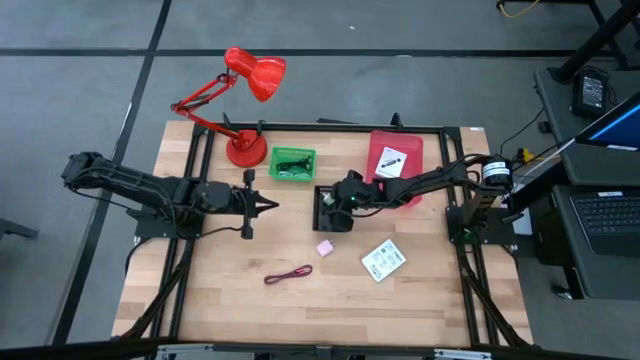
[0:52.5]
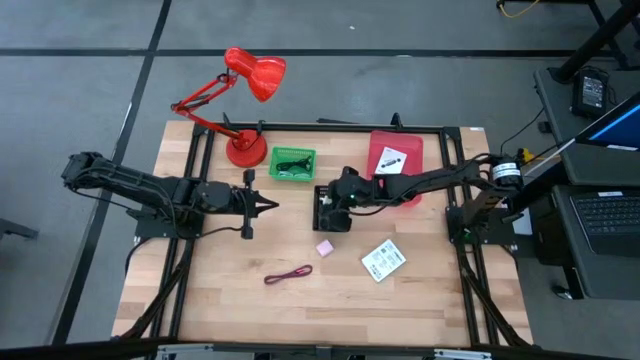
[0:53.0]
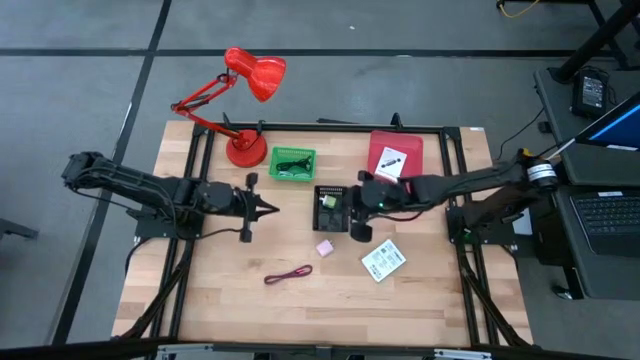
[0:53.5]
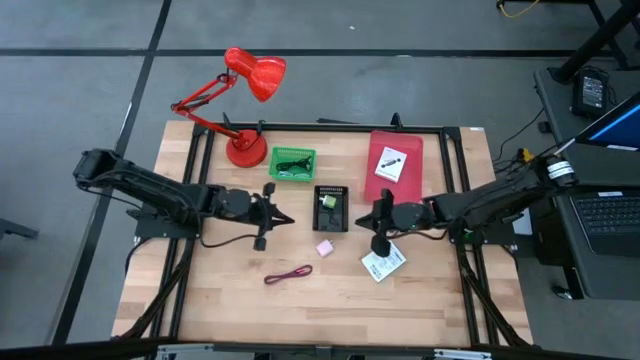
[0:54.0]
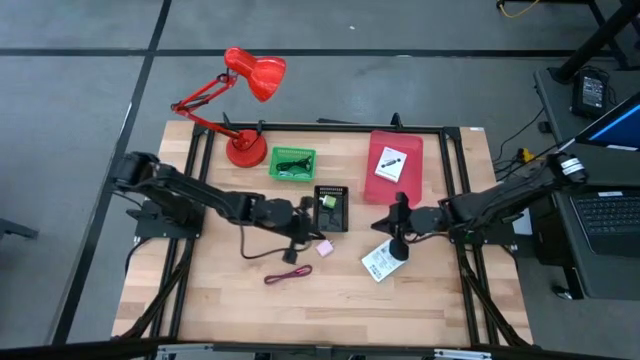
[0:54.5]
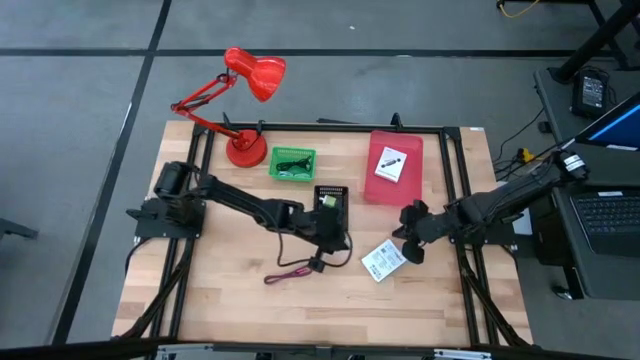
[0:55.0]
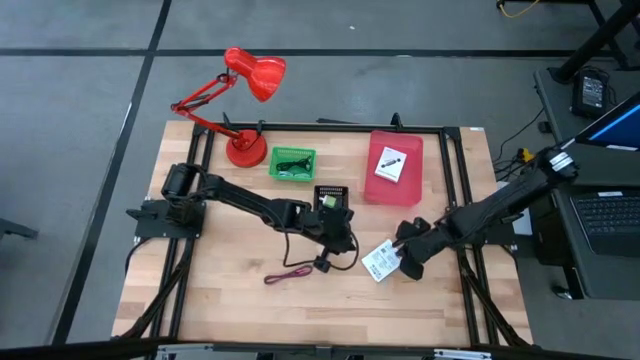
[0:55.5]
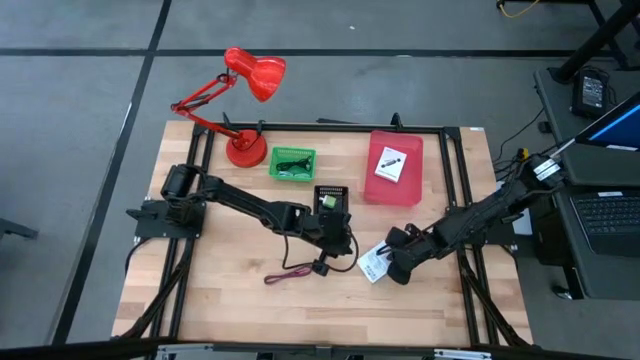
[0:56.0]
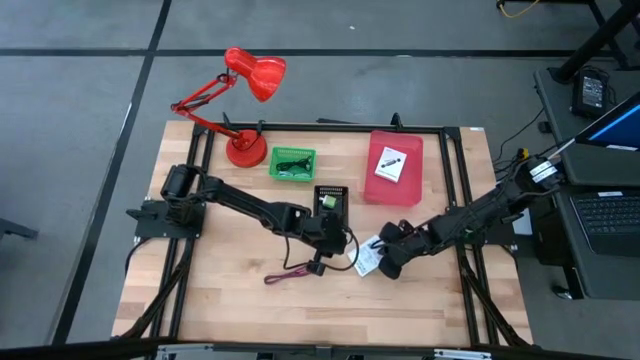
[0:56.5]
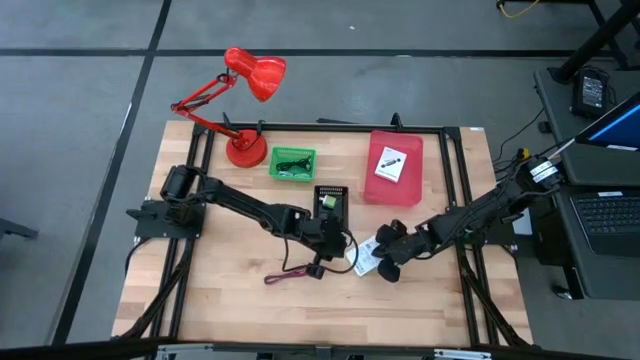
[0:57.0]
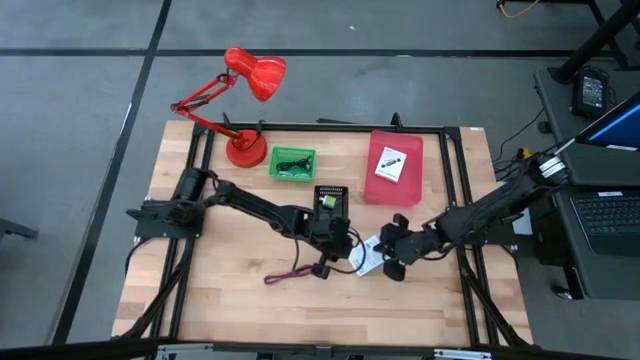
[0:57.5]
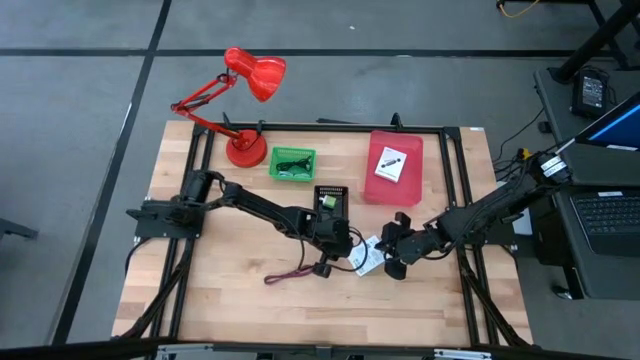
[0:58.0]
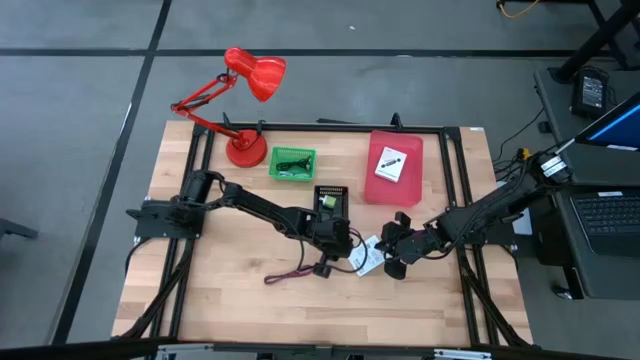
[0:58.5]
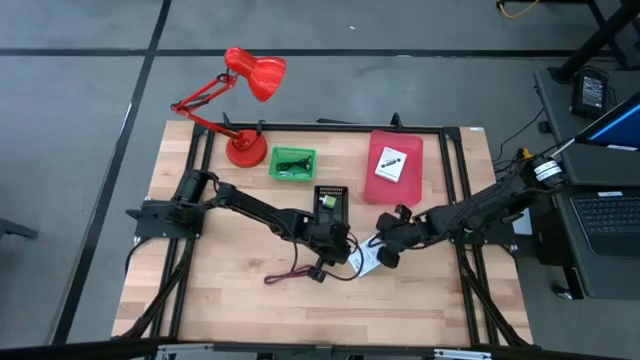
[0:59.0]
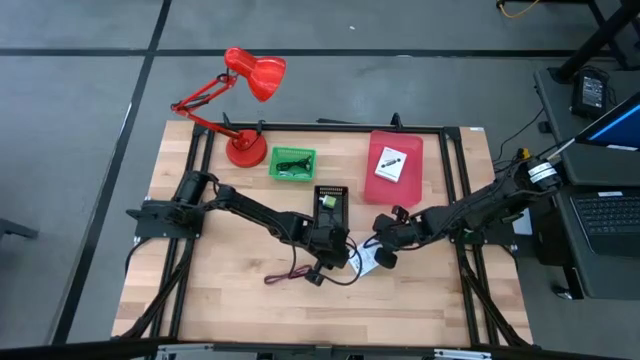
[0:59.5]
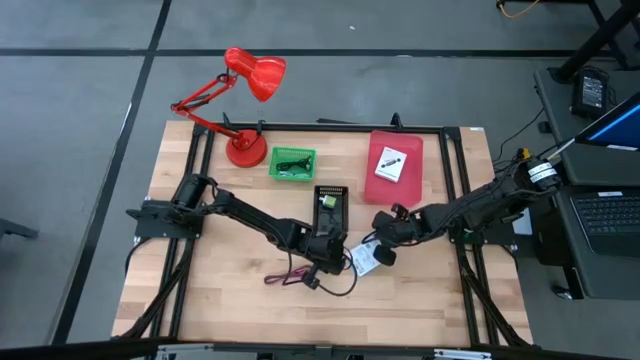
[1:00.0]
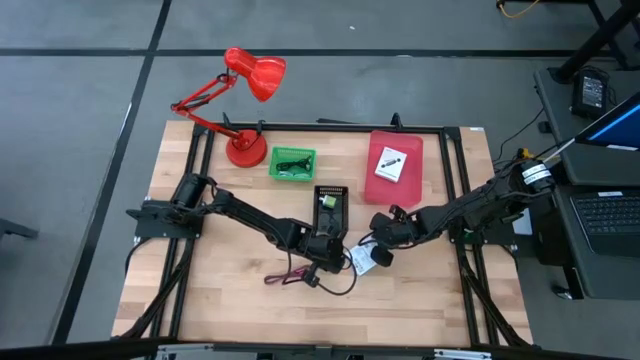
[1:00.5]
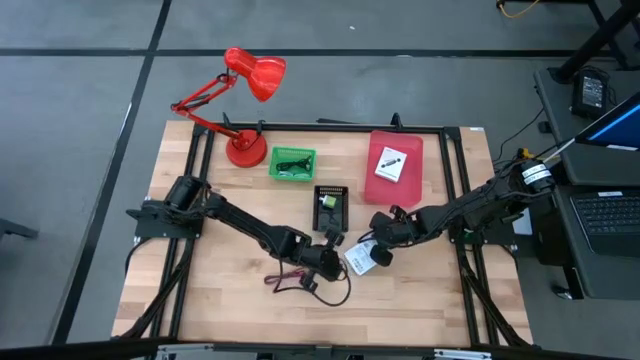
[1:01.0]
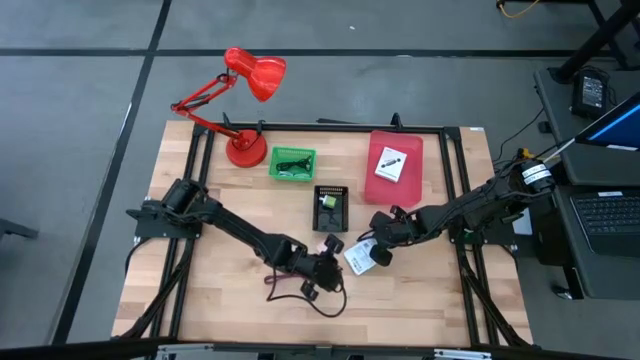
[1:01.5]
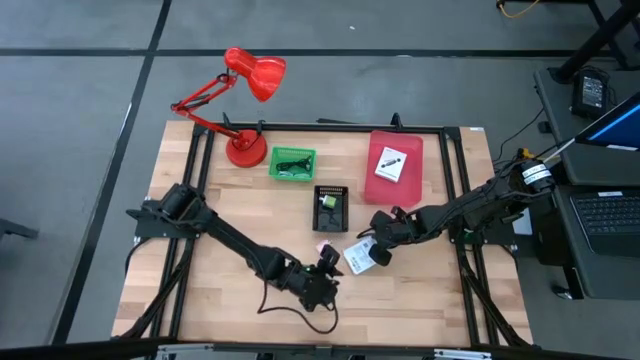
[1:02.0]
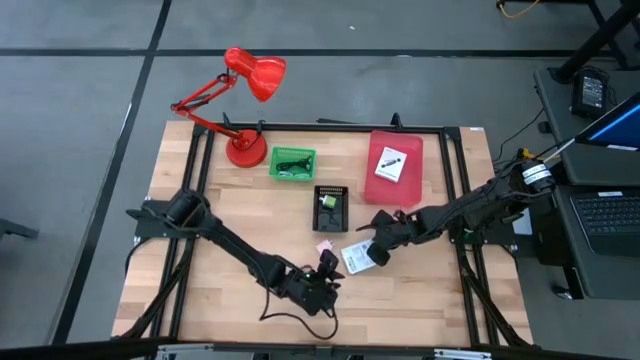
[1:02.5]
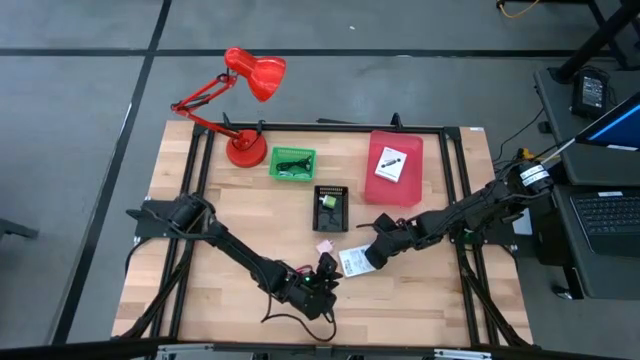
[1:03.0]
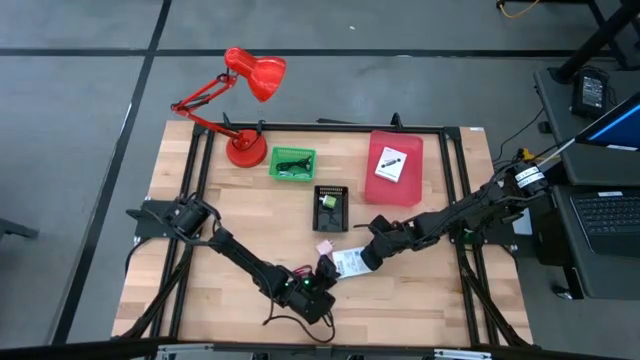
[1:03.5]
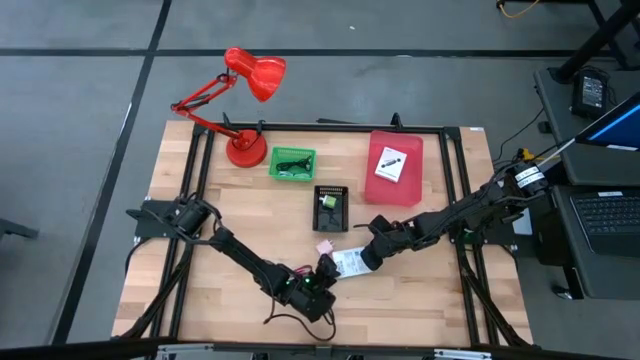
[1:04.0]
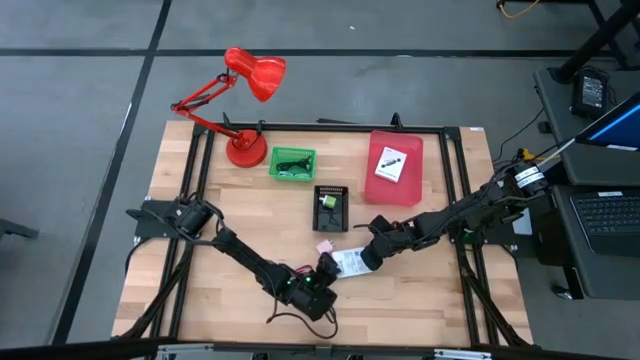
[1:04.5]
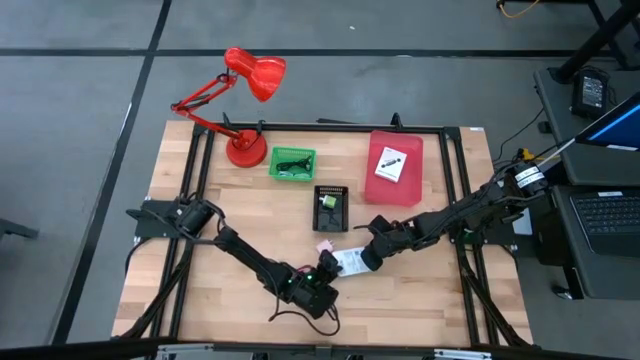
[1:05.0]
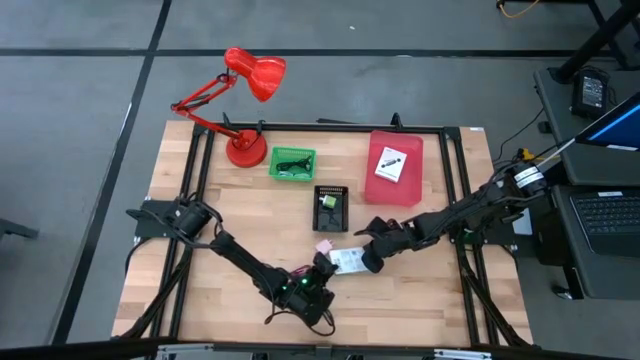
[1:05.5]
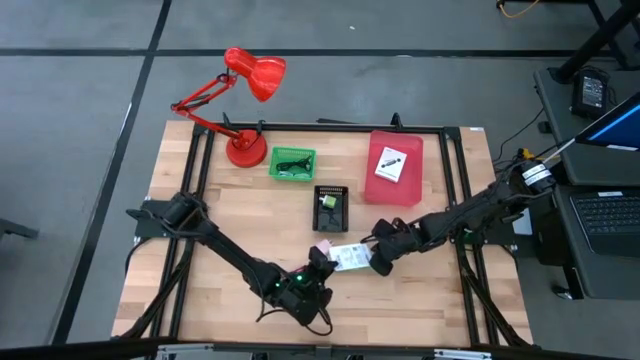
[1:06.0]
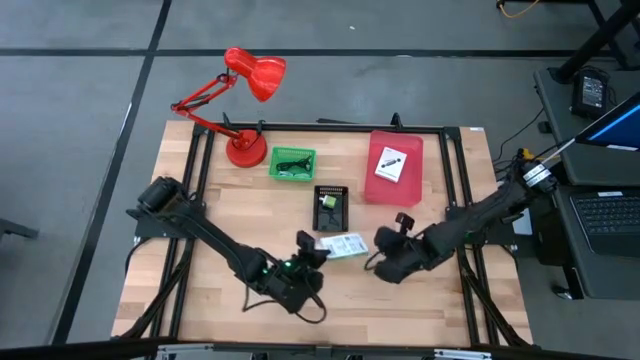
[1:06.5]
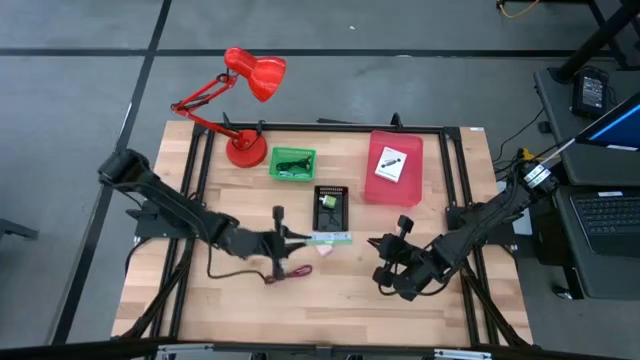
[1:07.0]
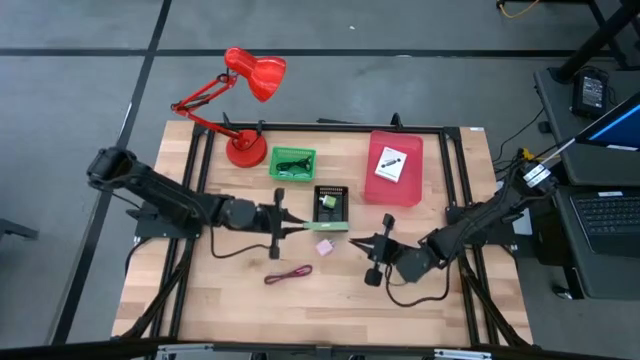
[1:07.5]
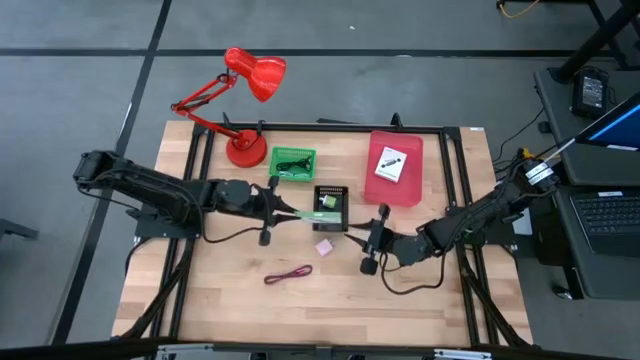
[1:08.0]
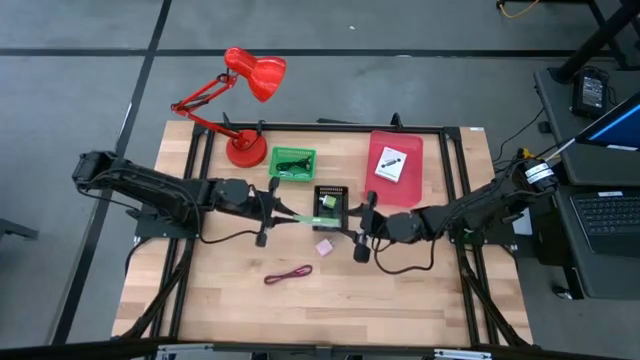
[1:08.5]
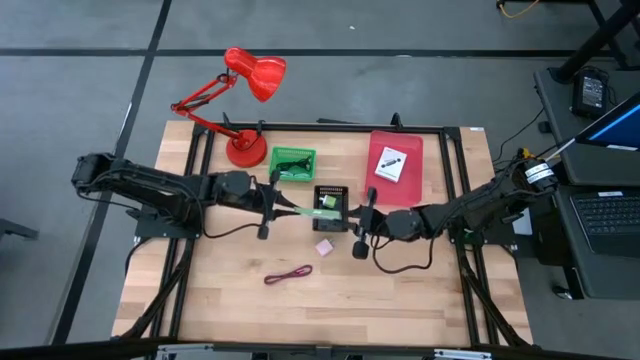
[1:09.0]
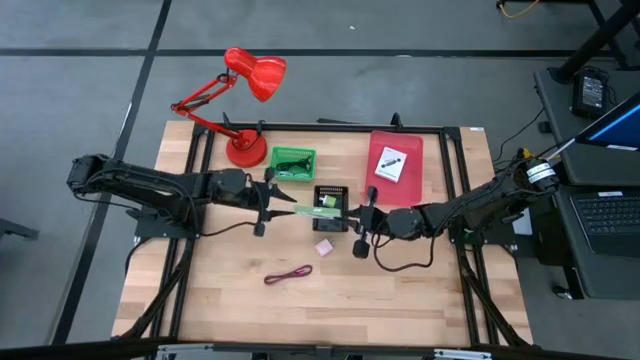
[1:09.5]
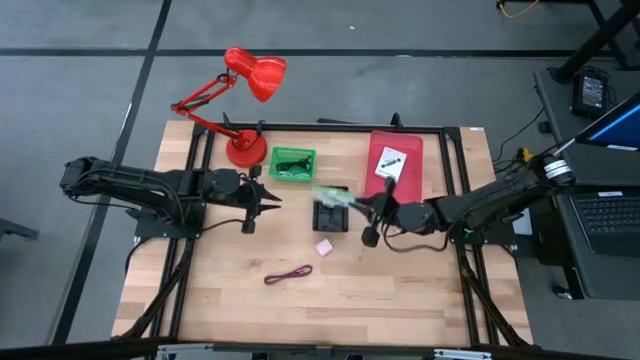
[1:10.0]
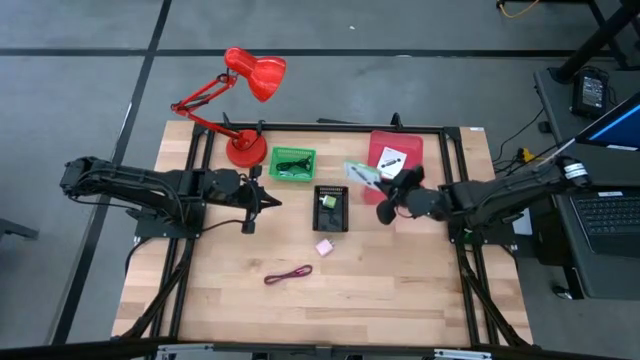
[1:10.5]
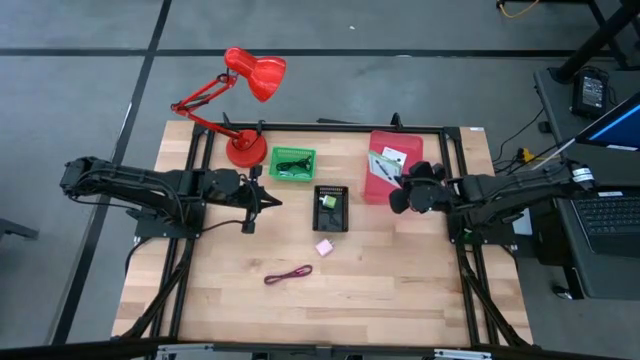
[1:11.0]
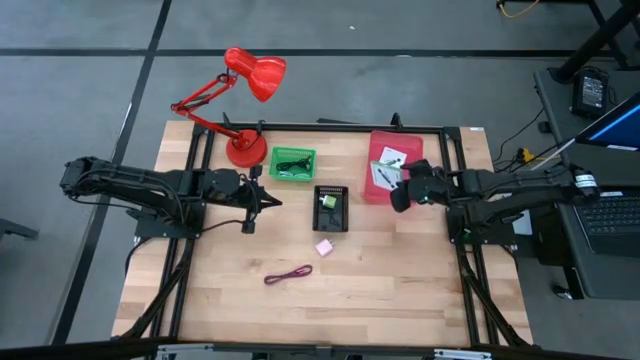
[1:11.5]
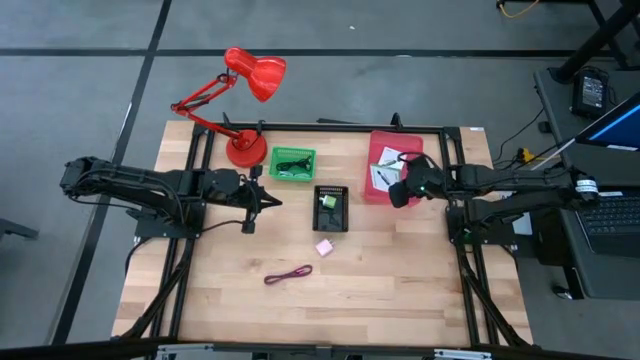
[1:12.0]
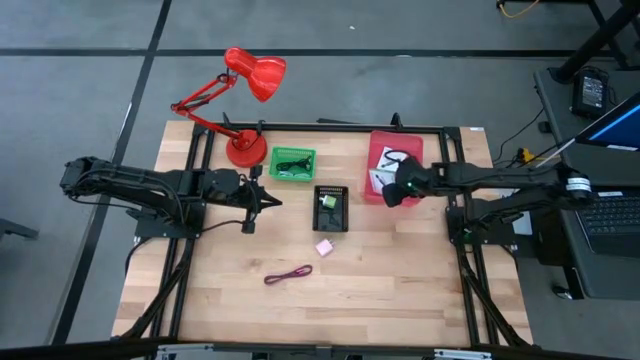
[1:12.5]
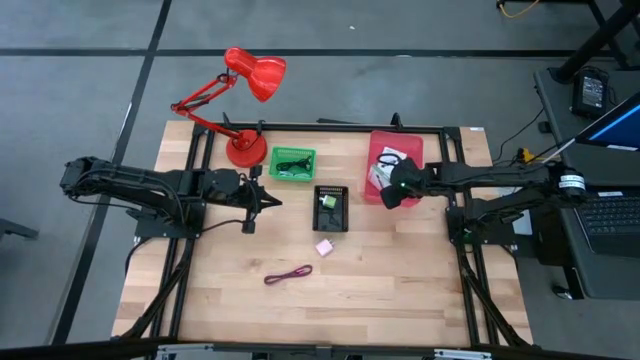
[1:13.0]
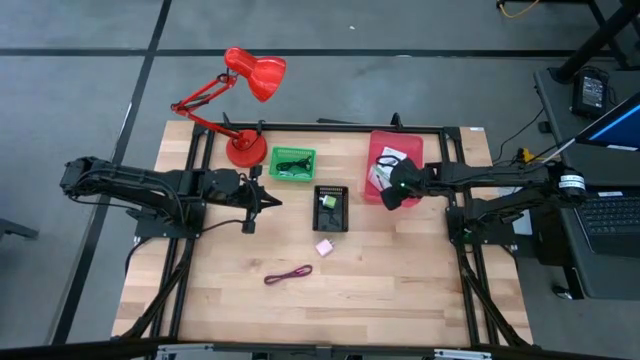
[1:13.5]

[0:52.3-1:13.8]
Task: Pick and place items into bin
Put the white card reader box into the pink bin
